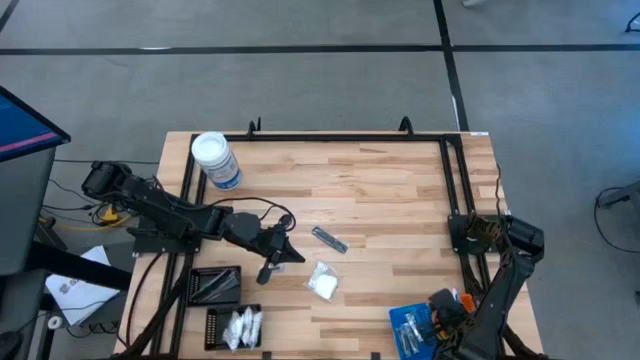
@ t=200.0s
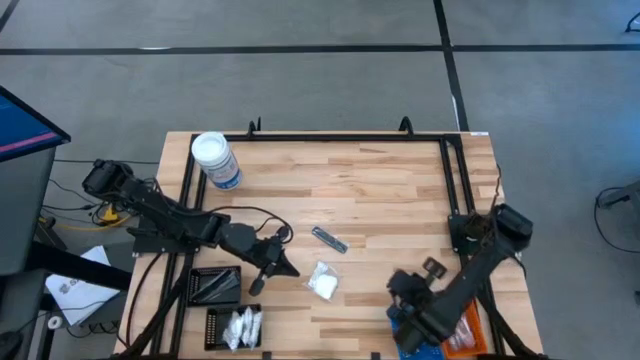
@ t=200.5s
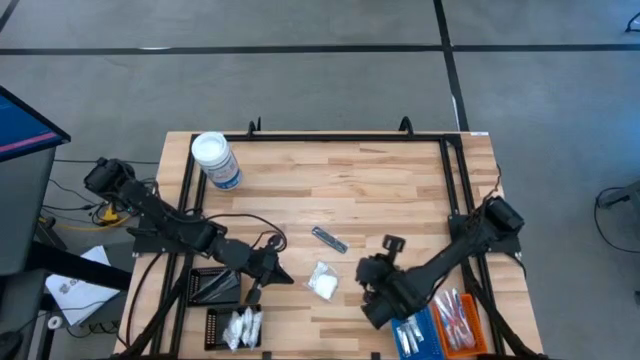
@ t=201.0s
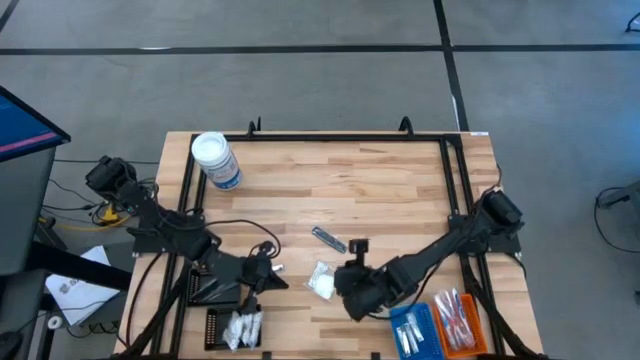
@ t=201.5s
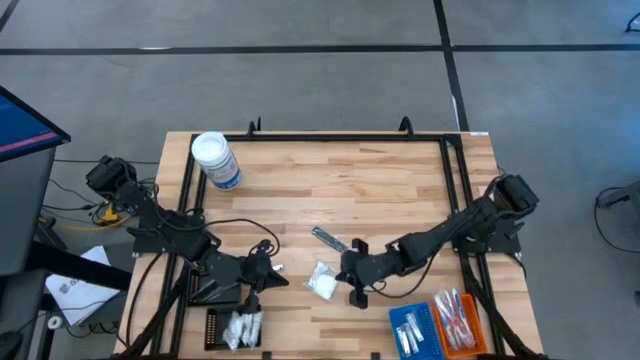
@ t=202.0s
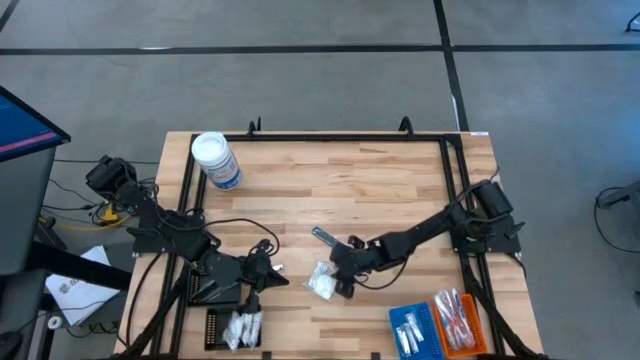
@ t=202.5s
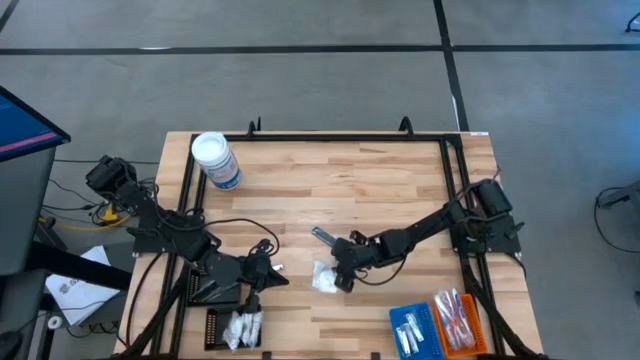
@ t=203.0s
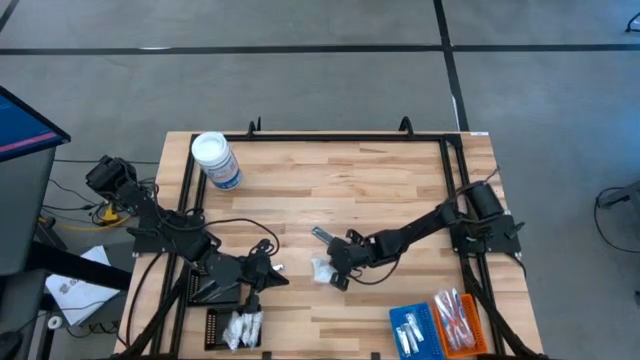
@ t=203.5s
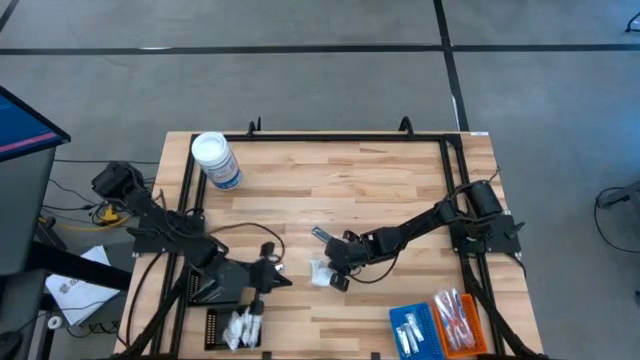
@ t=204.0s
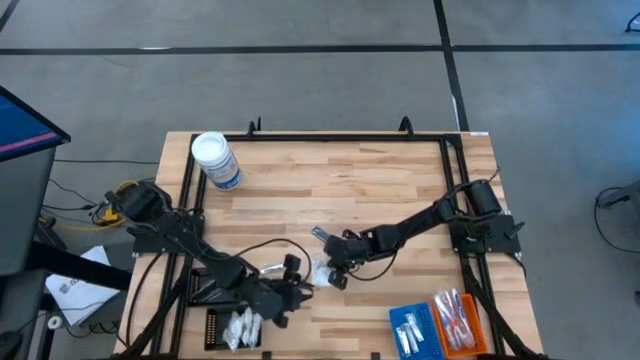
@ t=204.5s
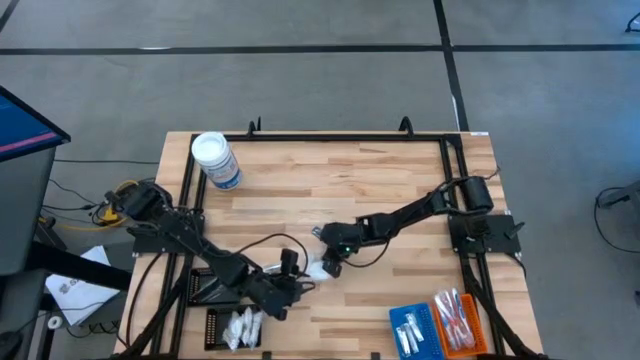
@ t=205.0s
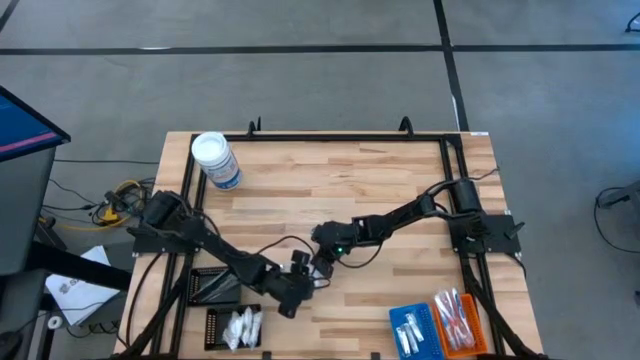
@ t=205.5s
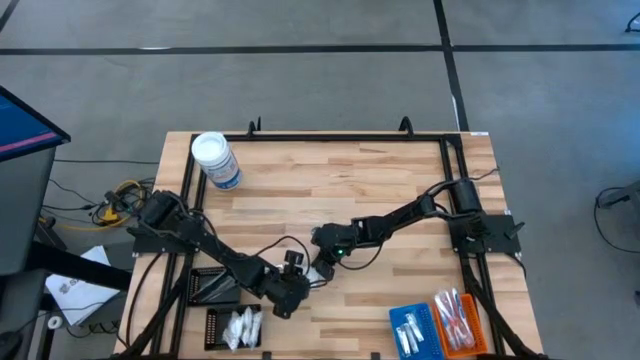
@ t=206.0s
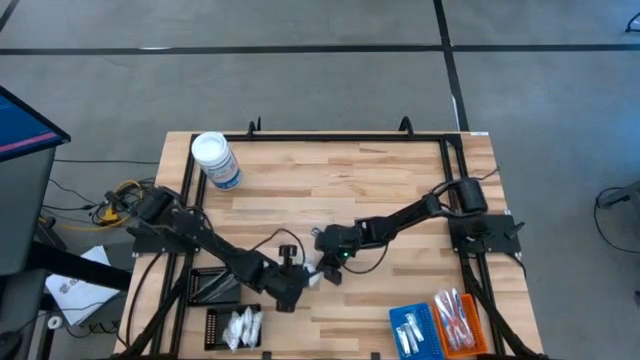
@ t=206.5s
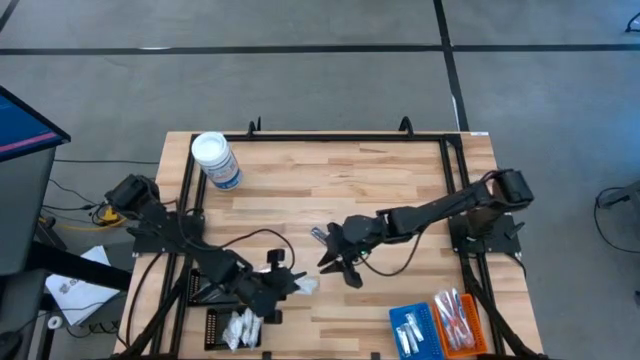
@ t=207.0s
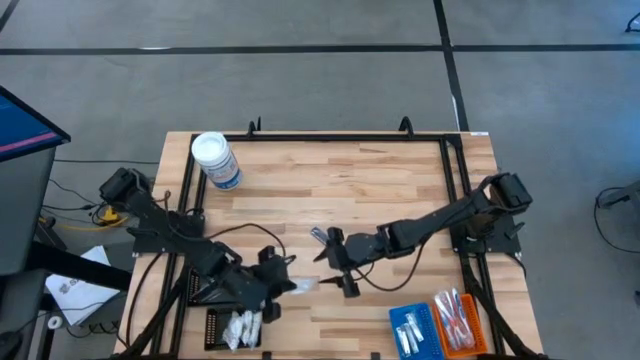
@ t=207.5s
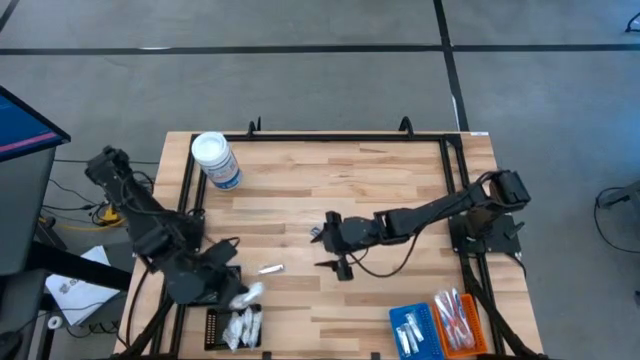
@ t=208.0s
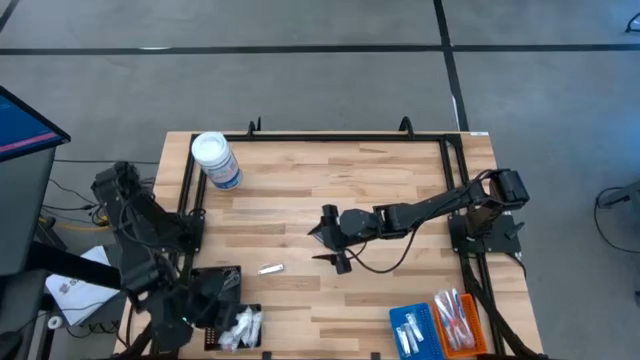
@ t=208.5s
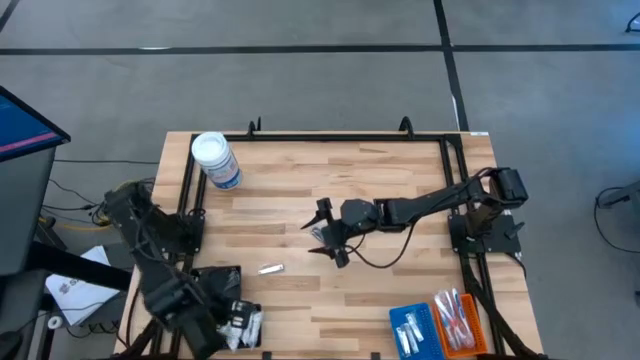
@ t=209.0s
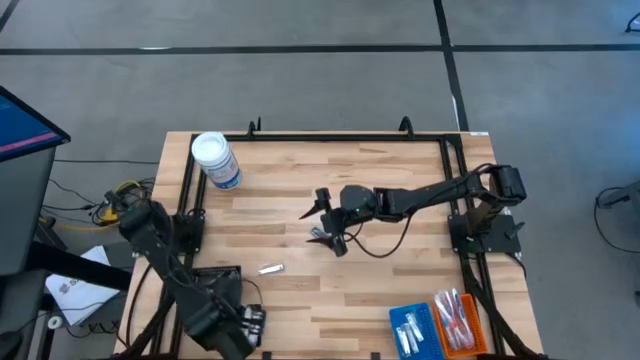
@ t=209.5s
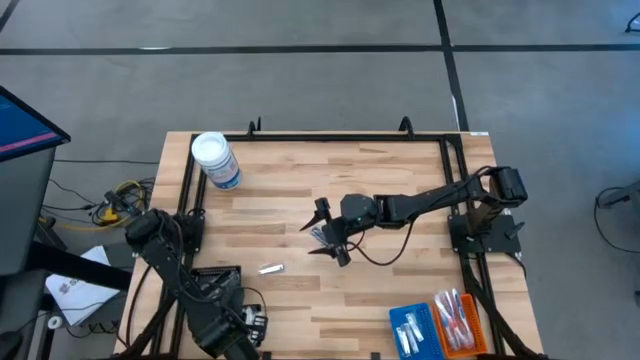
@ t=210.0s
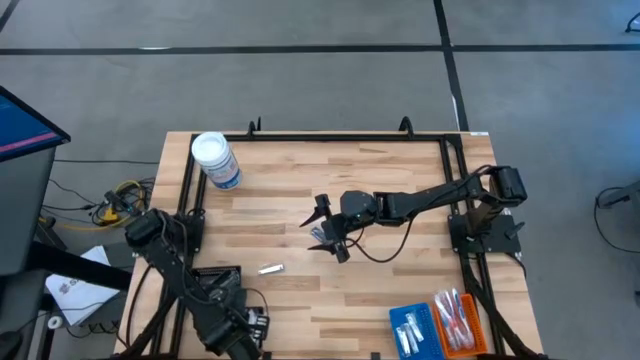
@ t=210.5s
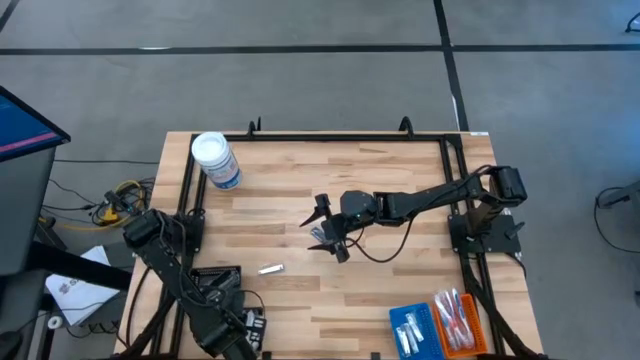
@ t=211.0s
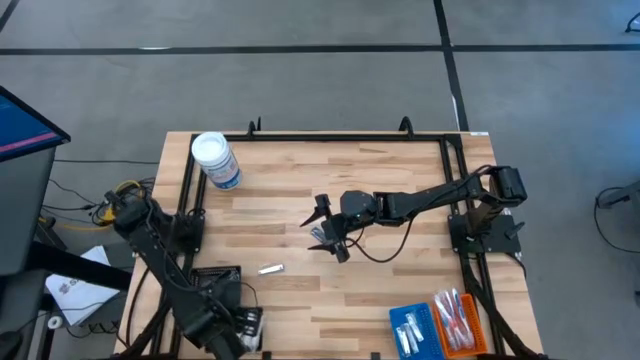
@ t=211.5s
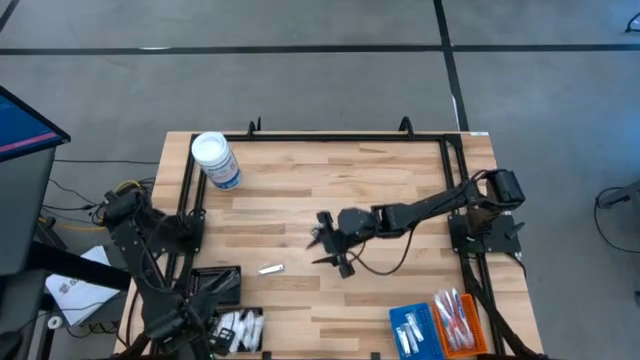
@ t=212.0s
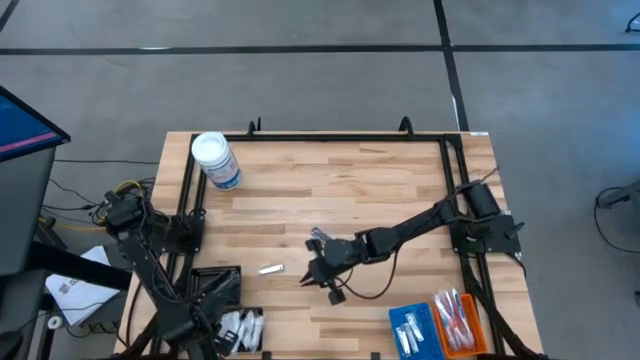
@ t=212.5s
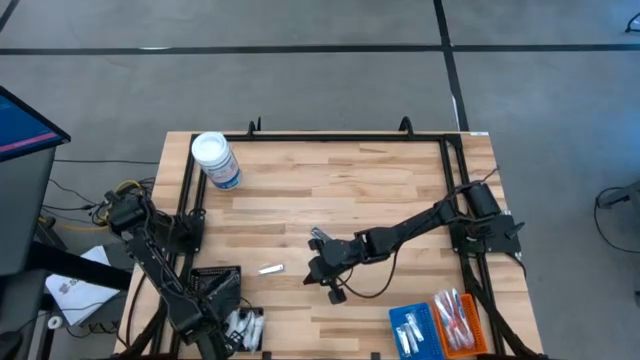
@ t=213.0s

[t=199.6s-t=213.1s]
Task: Pick & Place Travel size toiletries
Put the vanity pack into the bottom black bin

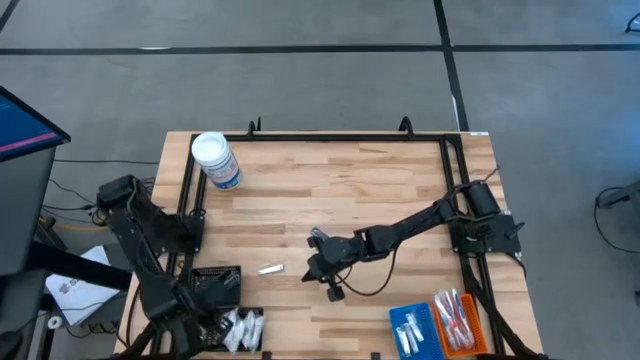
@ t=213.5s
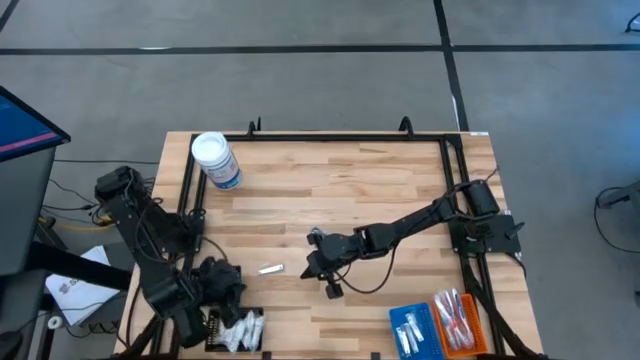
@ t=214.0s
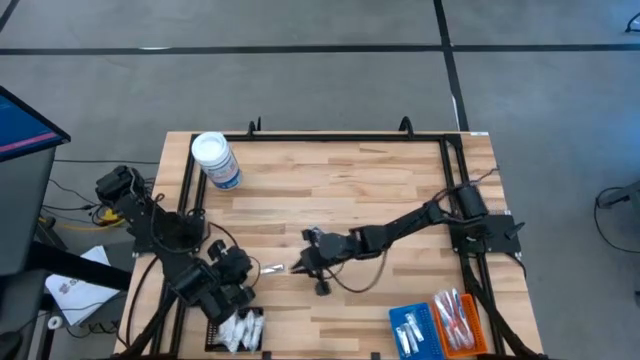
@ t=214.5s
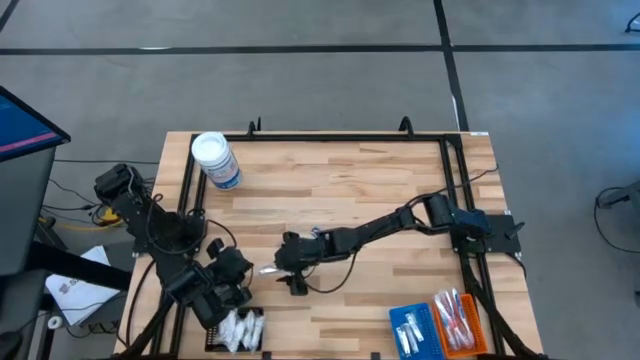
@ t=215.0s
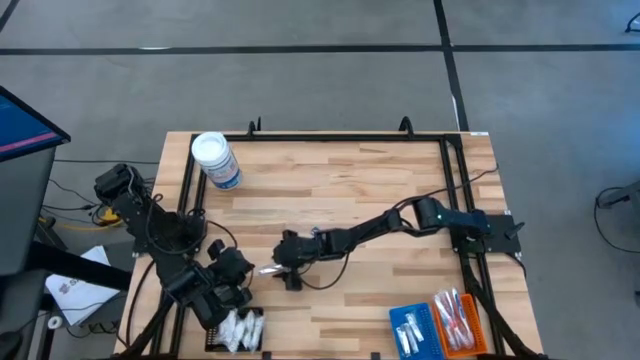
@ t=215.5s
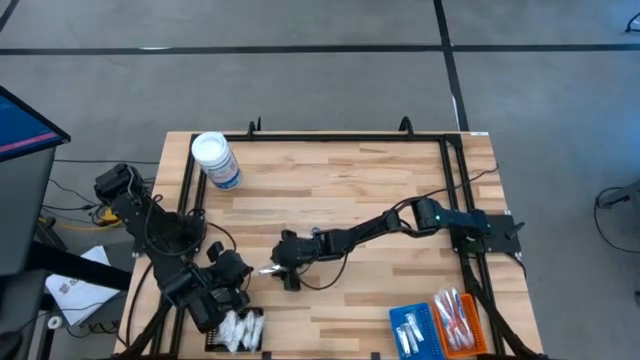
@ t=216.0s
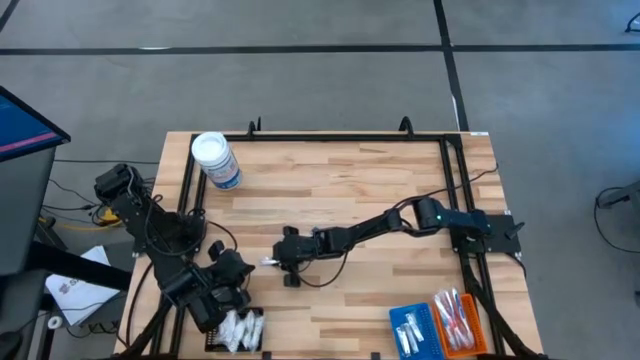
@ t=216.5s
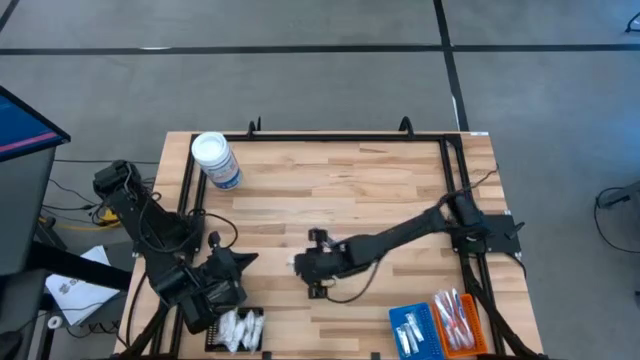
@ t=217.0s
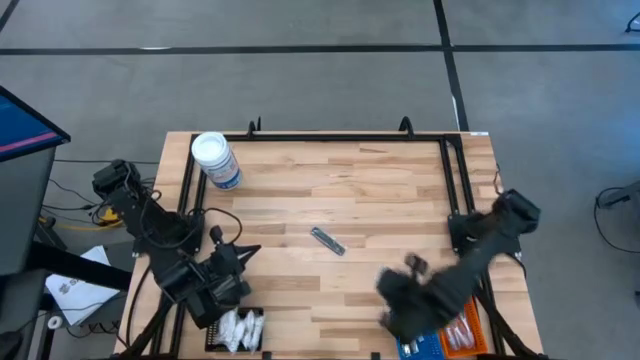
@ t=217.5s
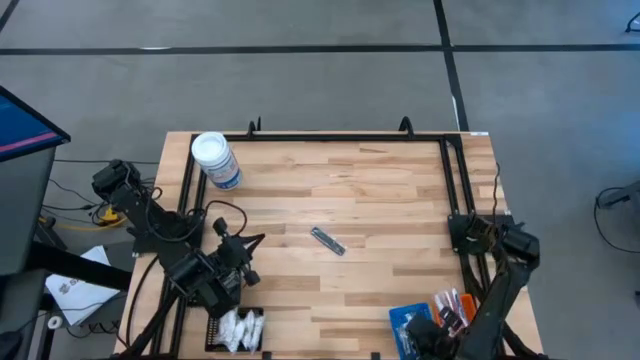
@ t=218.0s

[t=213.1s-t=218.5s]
Put the nail cutter into the blue bin

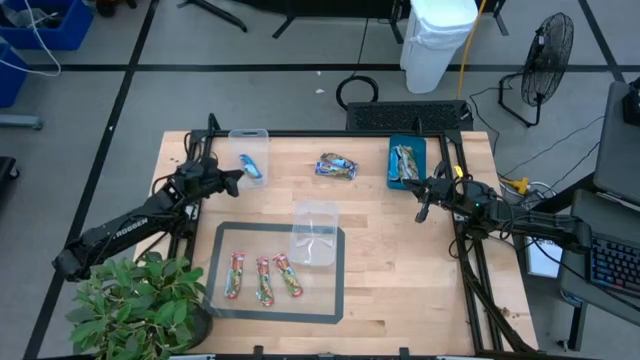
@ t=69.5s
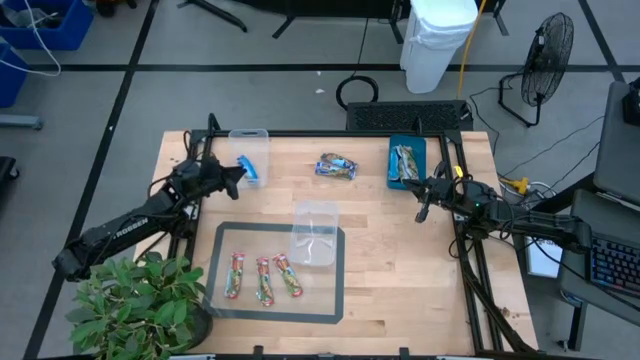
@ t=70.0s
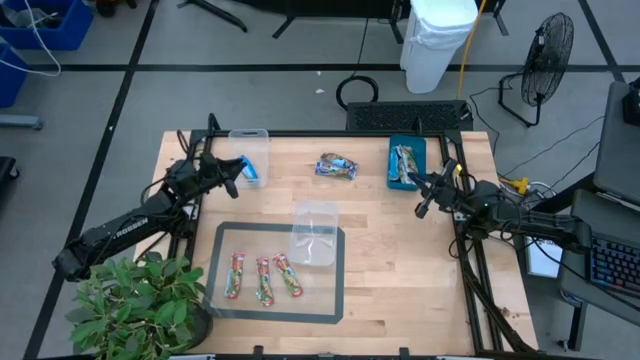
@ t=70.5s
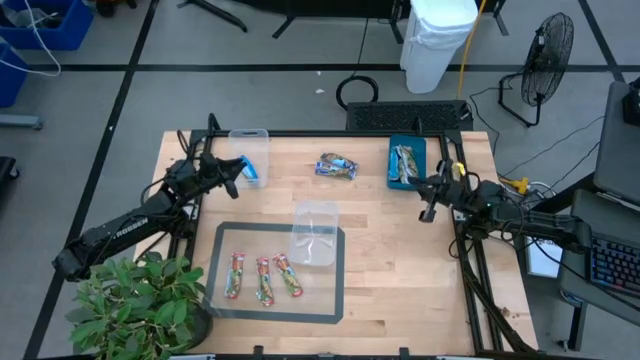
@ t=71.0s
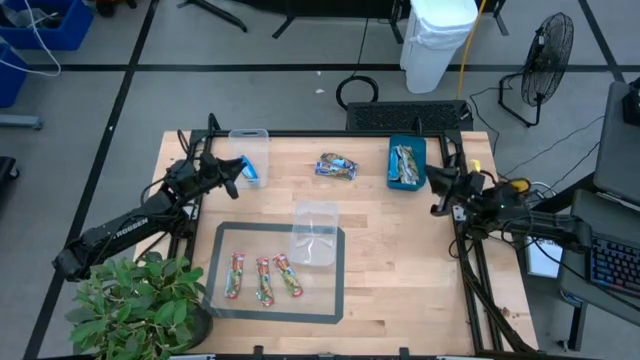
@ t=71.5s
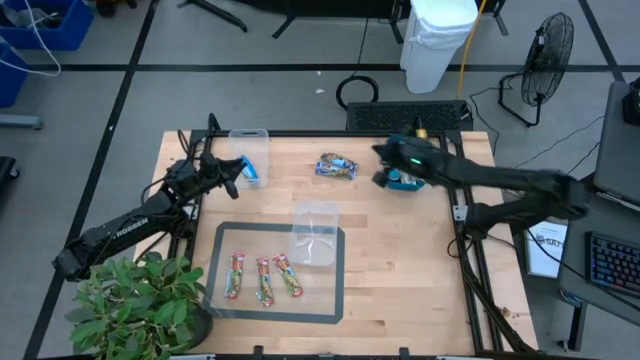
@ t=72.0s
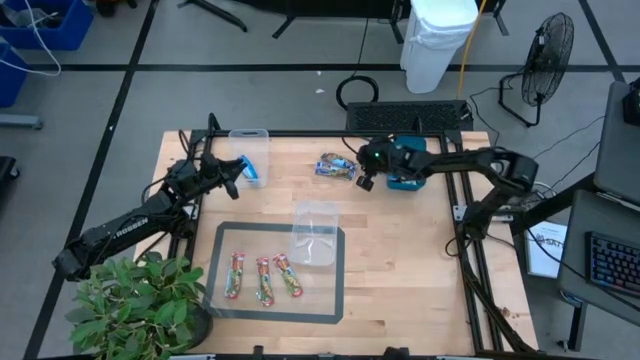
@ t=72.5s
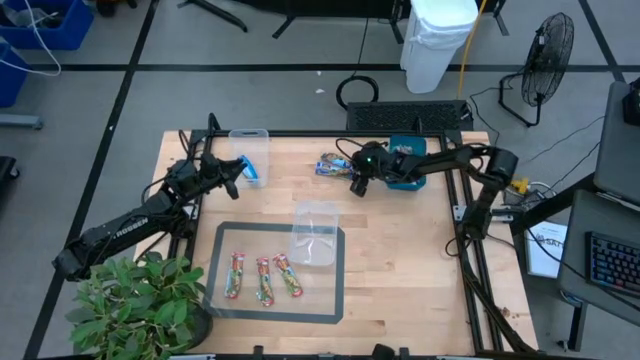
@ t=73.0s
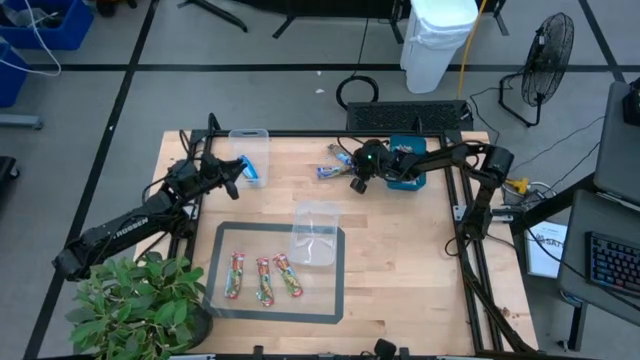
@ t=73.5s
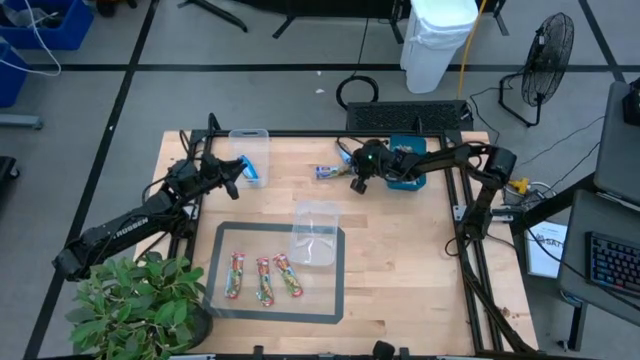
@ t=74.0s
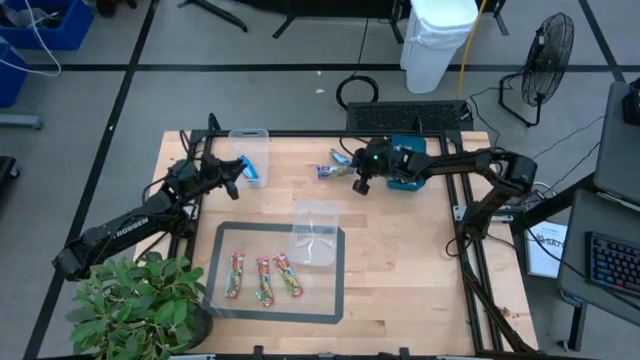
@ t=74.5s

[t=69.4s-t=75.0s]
Task: Pick and place Granola Bars by type
Put the blue granola bar into the top blue bin
